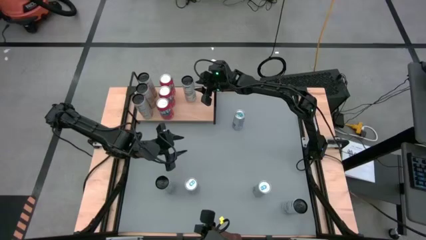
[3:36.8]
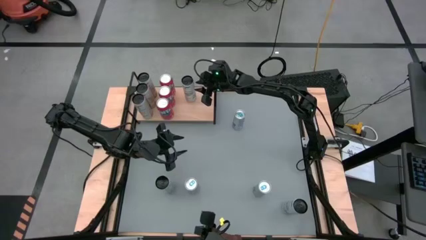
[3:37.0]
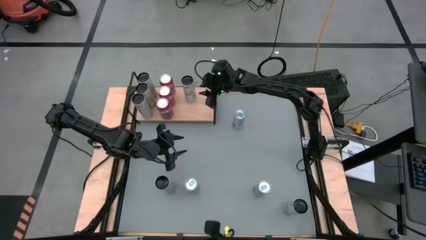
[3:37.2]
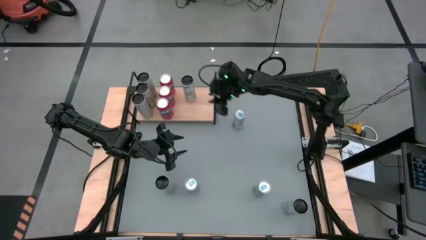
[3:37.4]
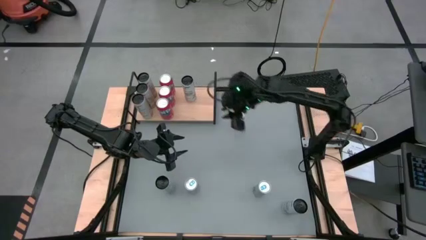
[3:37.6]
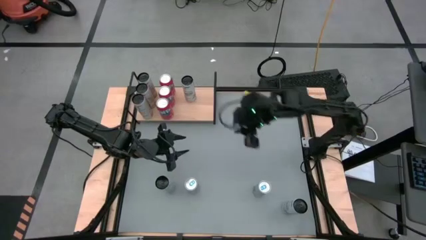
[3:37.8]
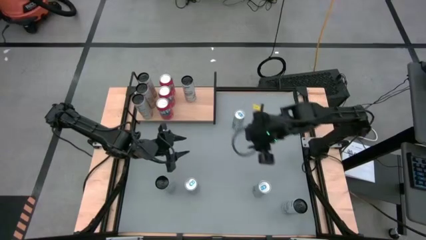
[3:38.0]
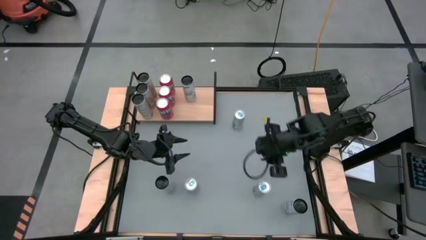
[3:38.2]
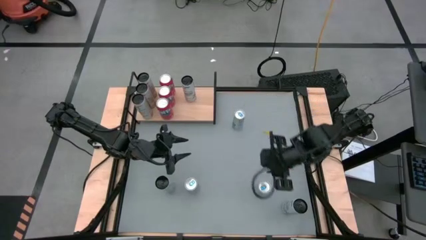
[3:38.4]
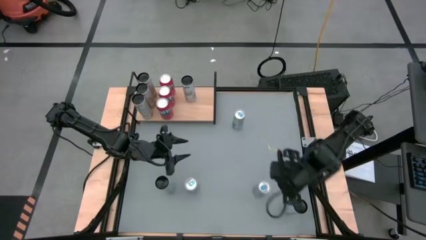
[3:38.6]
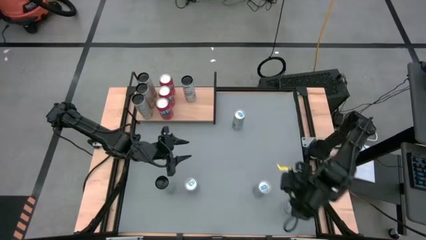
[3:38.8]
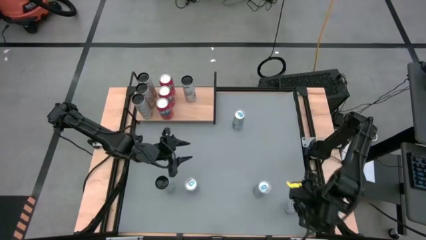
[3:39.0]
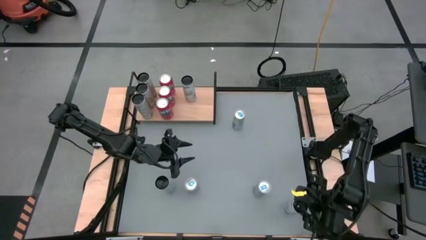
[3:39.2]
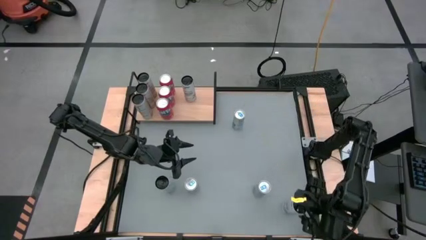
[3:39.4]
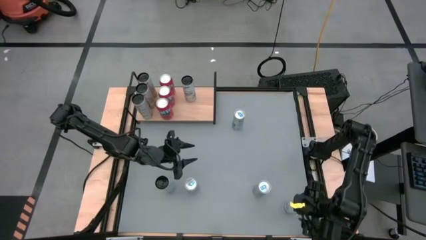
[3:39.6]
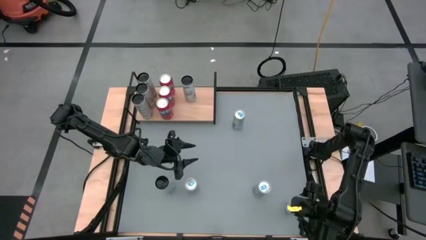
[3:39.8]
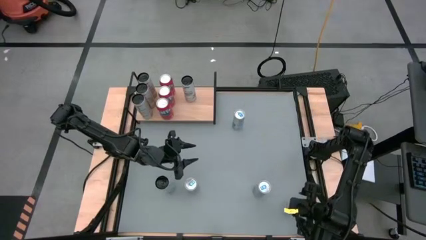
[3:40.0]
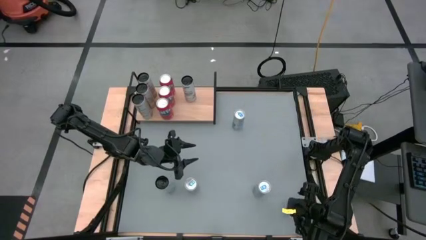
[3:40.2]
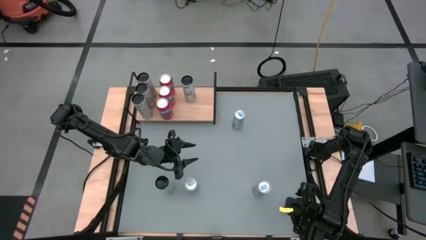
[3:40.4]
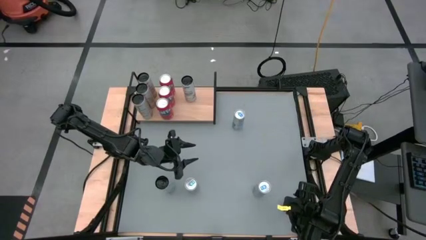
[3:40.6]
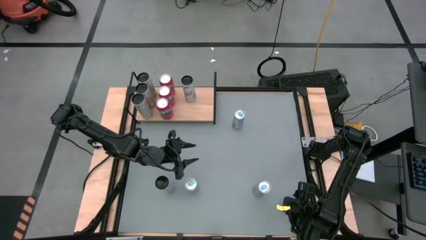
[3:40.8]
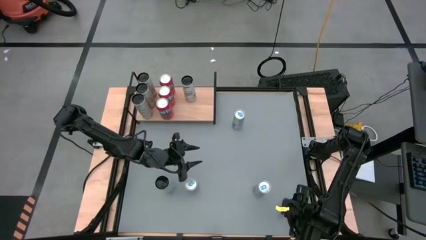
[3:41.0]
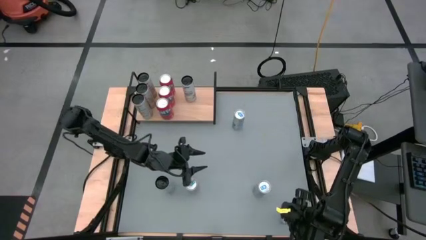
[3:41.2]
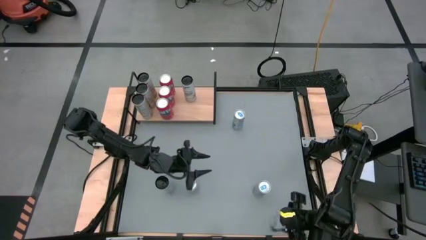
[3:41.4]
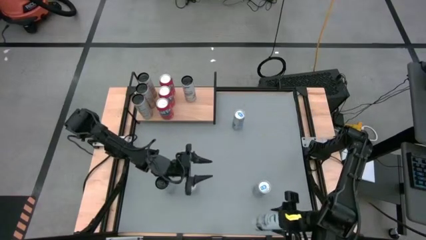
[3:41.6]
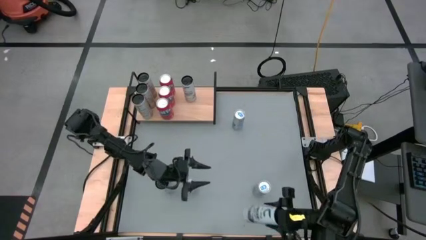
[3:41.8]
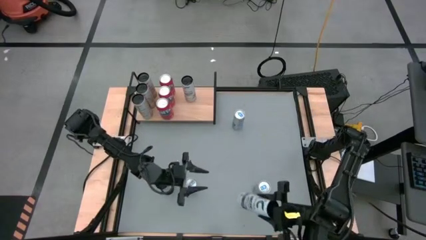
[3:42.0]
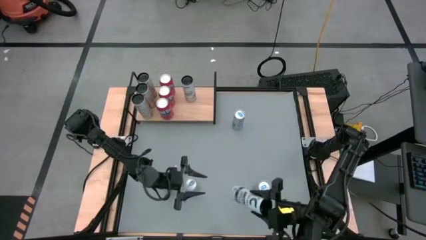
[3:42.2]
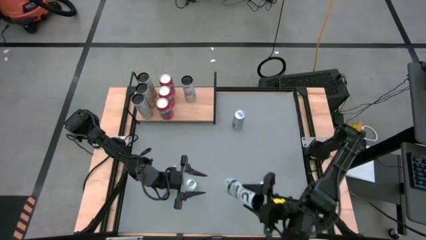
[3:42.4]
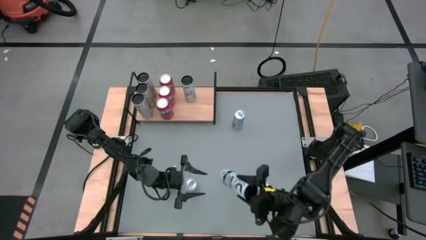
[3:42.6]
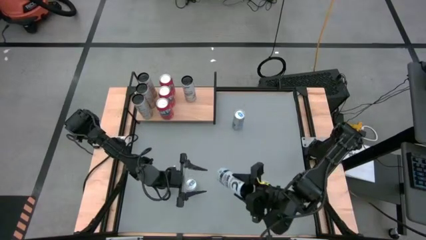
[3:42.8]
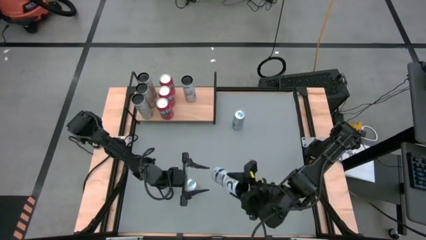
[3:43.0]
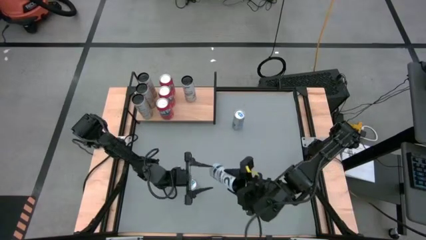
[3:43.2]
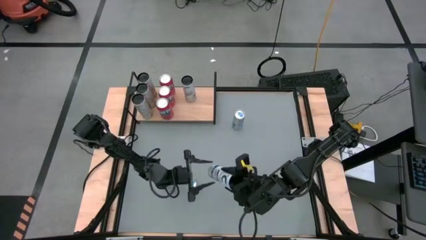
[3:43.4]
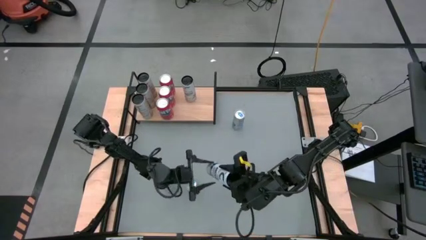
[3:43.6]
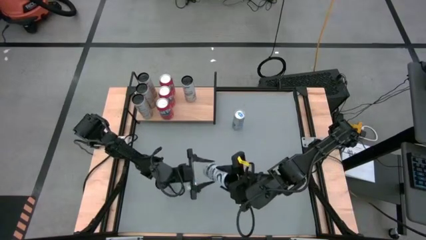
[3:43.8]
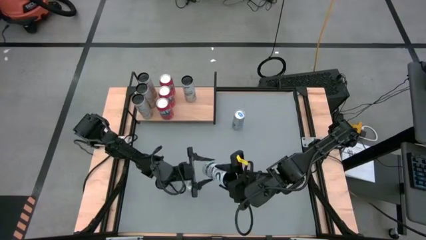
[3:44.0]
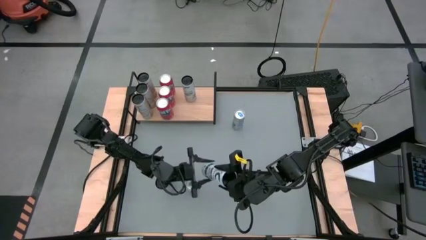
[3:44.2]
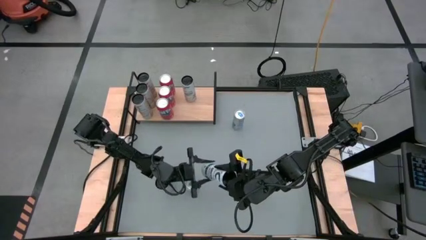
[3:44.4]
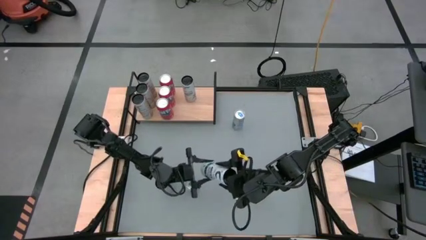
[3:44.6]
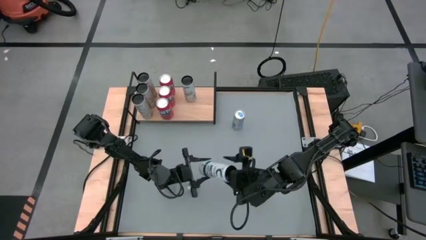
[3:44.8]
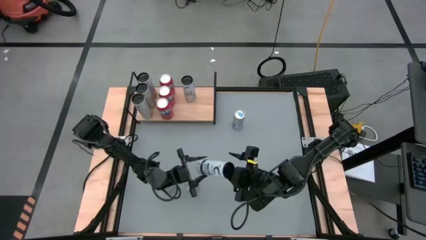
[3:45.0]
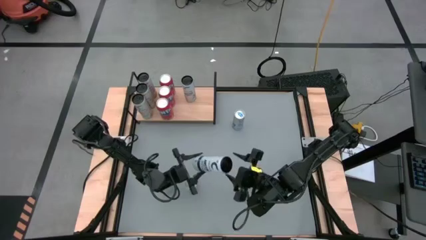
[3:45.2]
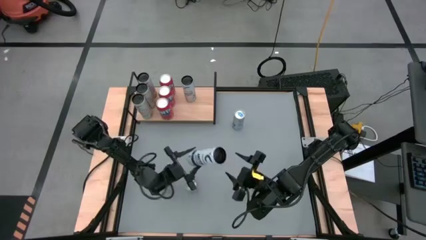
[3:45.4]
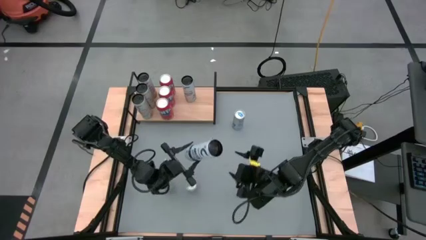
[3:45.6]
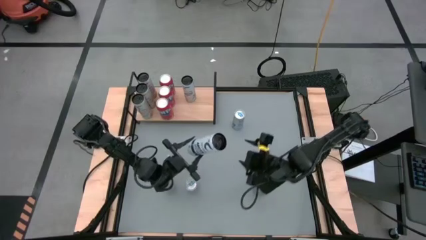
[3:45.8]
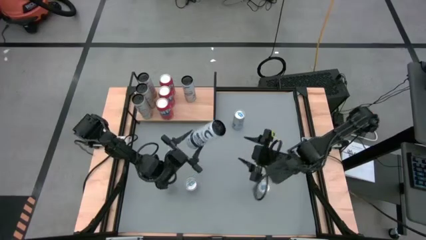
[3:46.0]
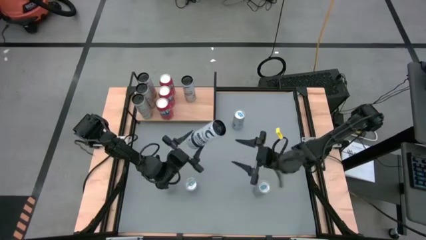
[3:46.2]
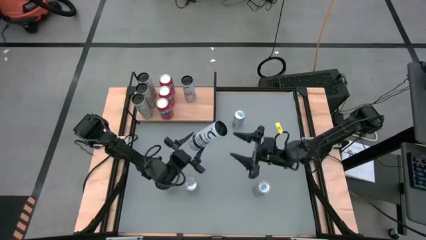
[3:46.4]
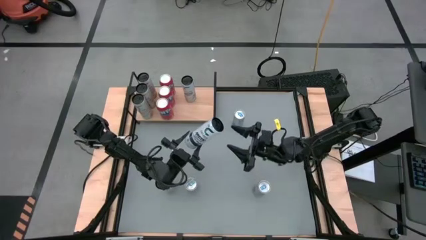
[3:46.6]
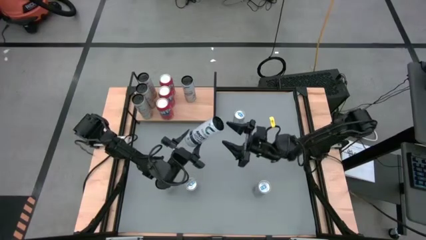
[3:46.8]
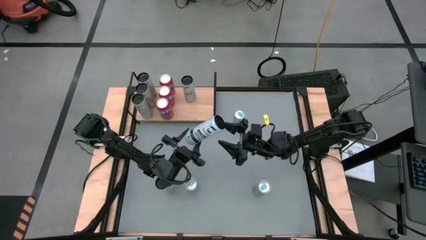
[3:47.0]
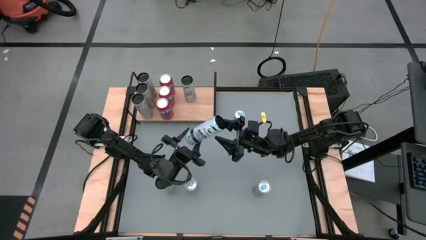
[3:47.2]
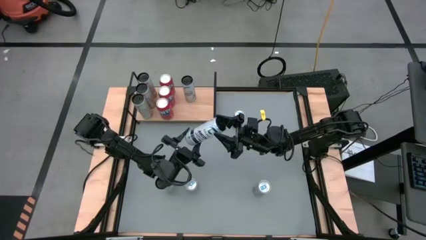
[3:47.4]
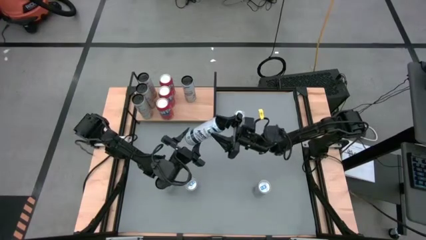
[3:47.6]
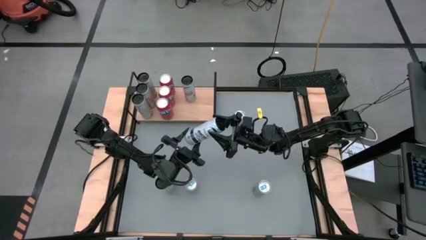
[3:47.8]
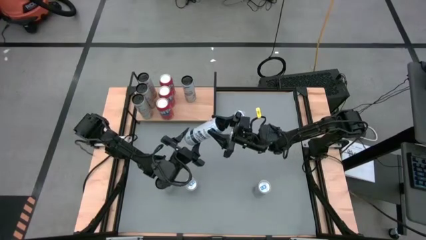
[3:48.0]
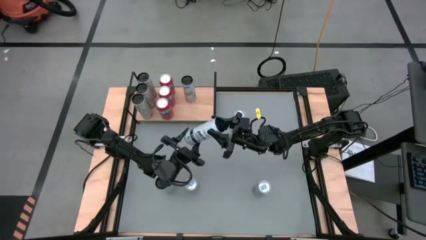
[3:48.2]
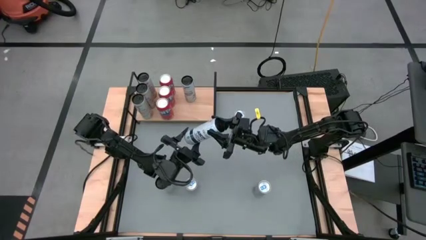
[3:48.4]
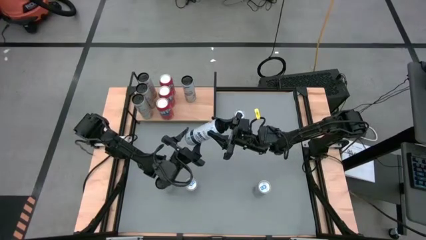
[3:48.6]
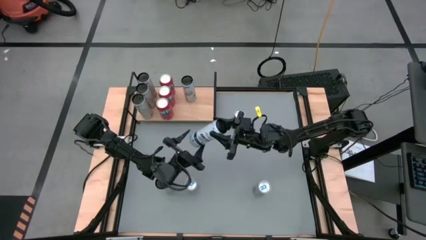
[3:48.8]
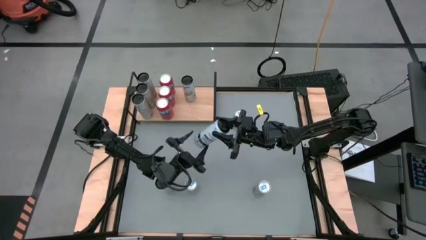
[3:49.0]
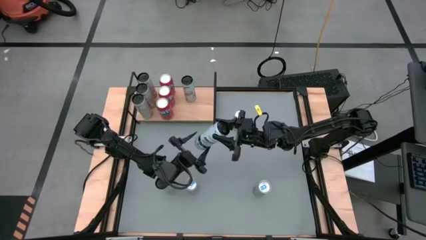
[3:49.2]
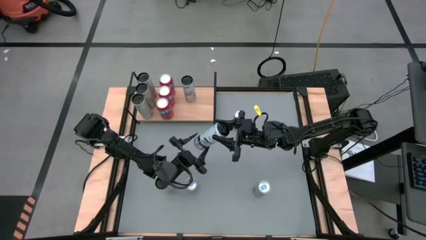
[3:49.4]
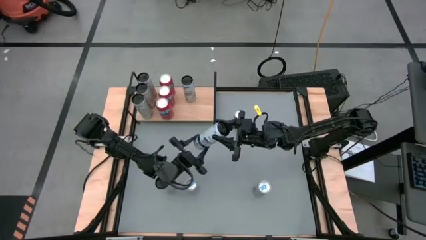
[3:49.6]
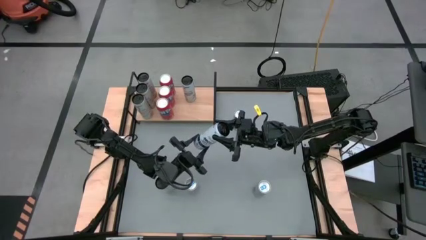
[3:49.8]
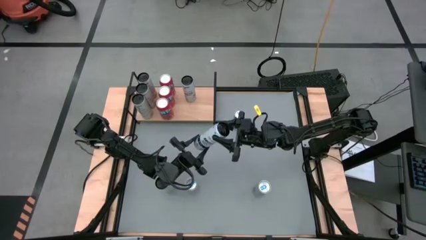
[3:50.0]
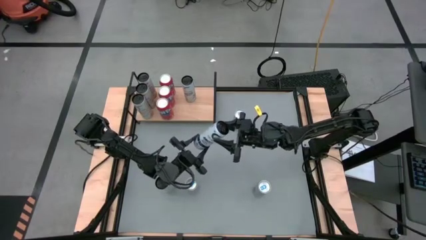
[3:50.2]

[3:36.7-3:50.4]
Task: Place canned beverage on shelf
Put the right white-blue soda can on the shelf aligned with the other white-blue soda can
